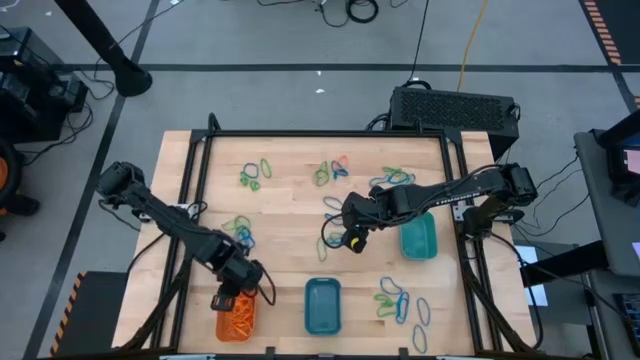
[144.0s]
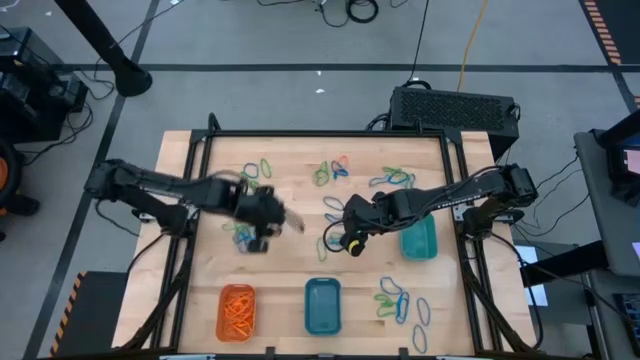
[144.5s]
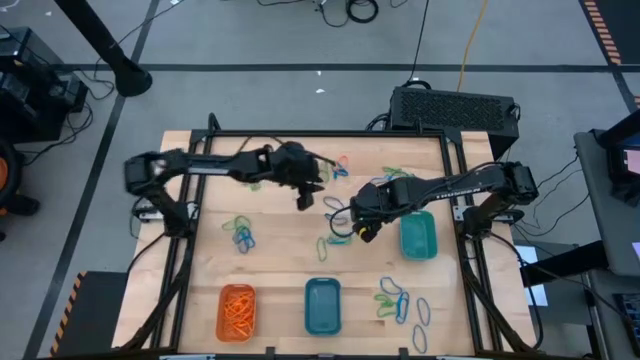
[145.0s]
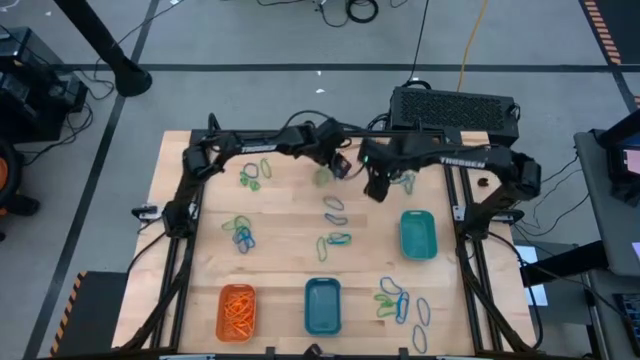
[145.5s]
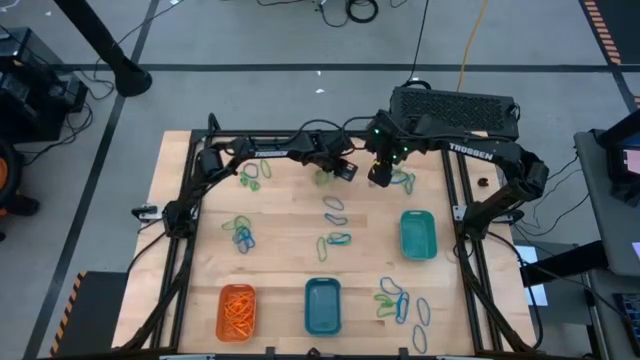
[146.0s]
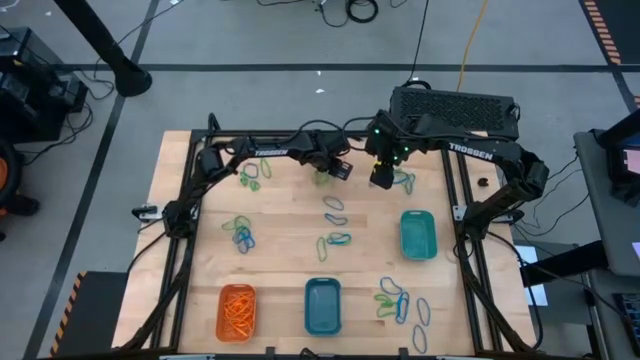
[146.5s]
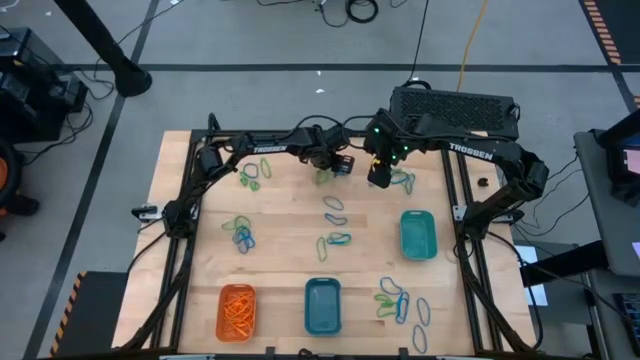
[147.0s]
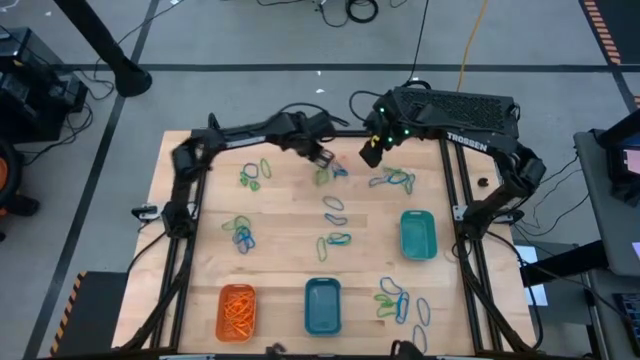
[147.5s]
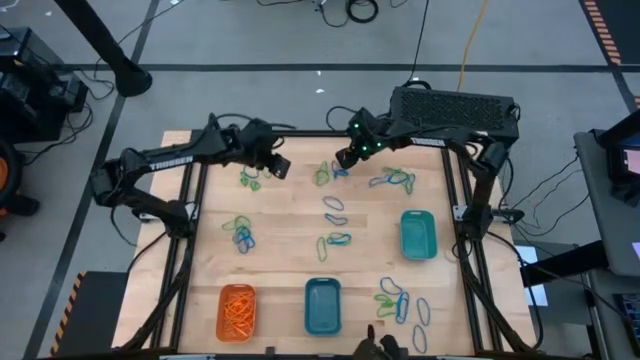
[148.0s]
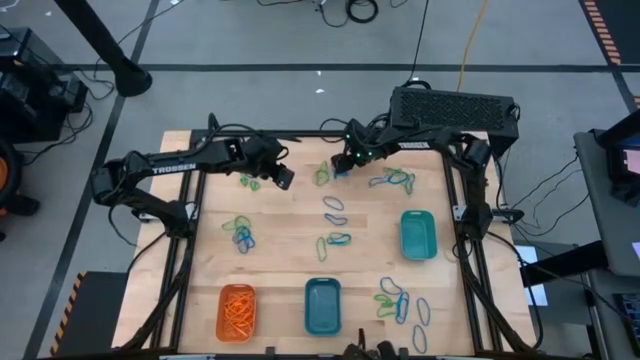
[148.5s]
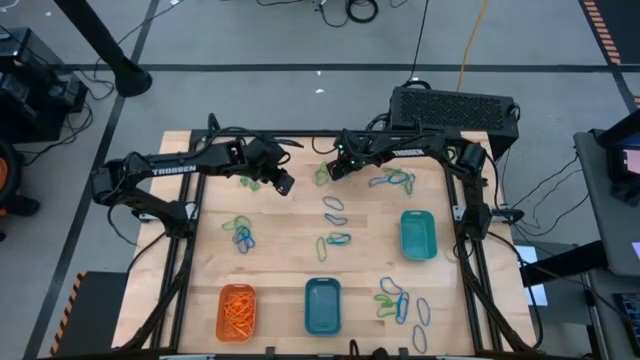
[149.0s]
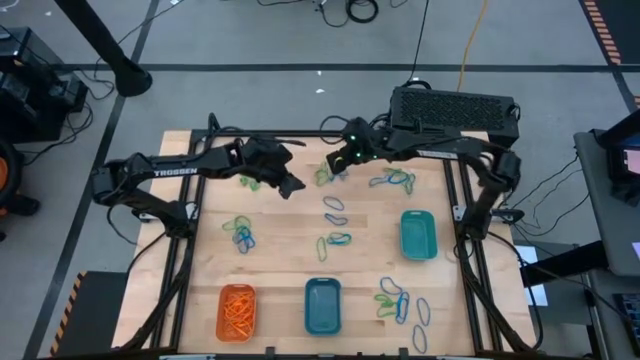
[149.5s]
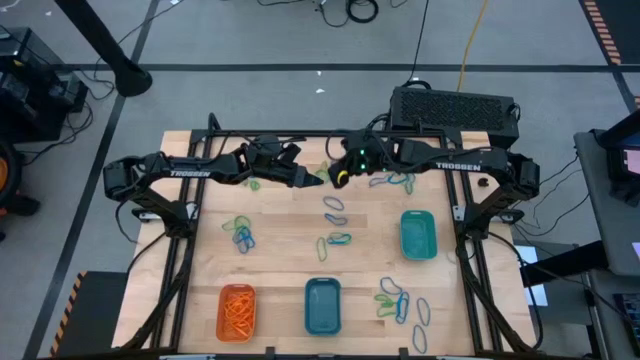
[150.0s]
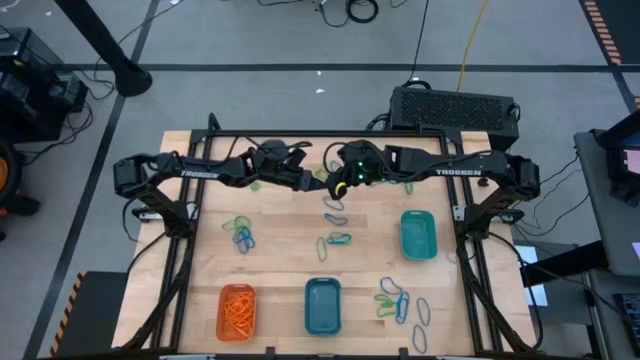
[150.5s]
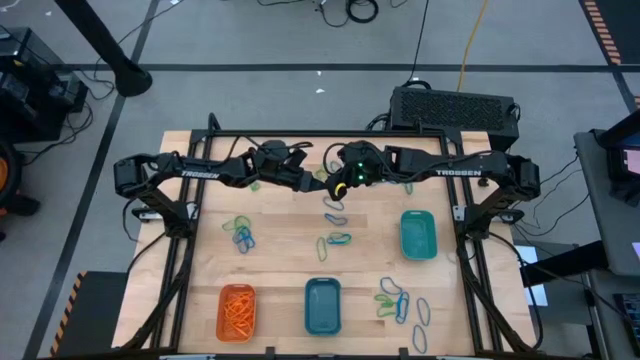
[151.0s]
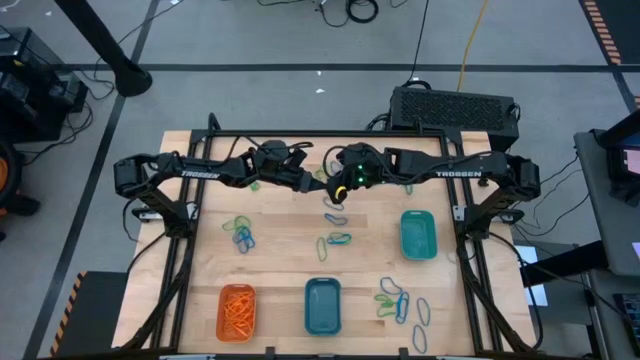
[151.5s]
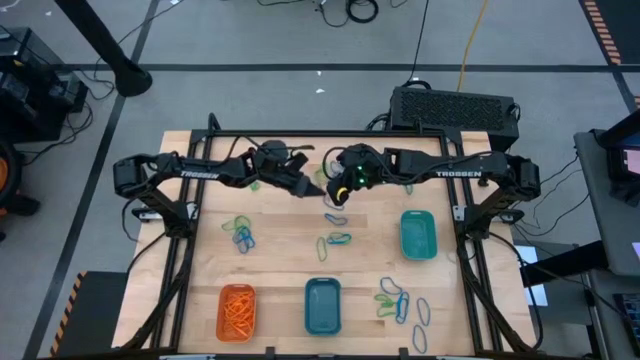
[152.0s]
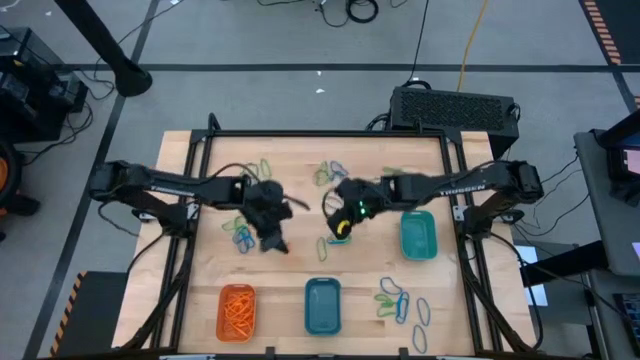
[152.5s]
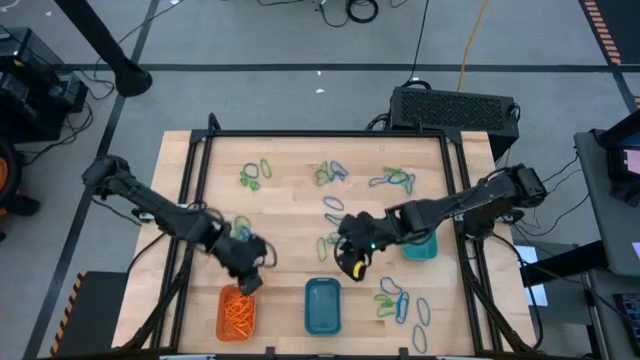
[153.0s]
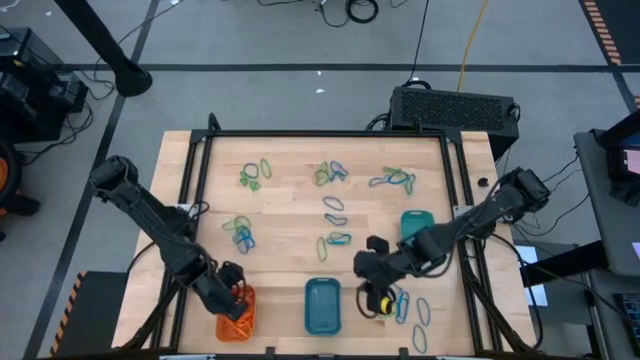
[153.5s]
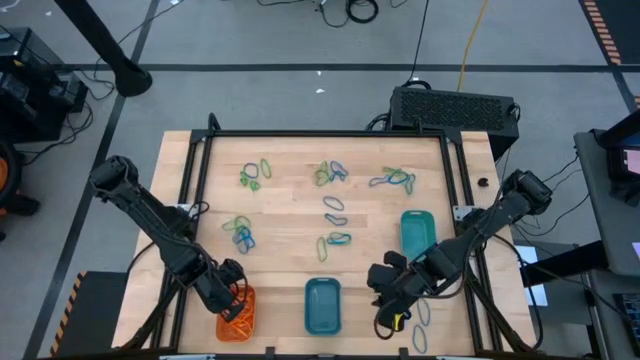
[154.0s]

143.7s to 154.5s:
Task: Sort rubber bands into baskets
Put the orange rubber band into the orange bin

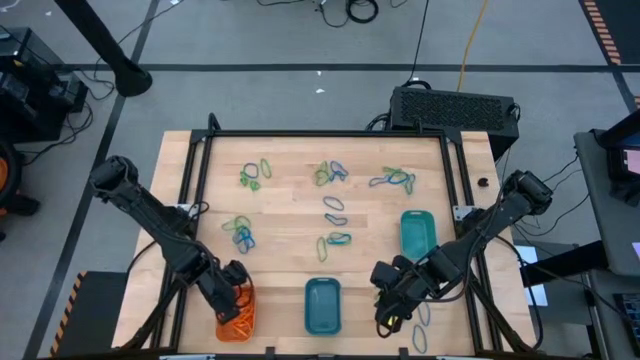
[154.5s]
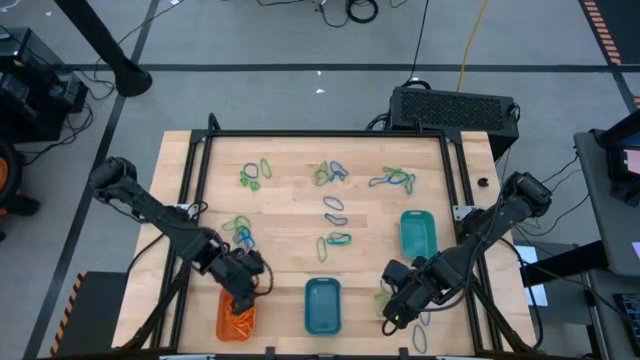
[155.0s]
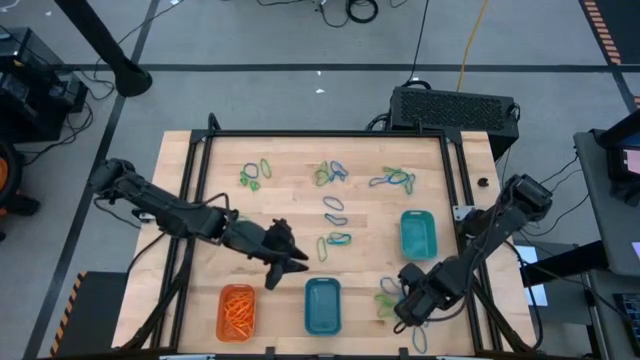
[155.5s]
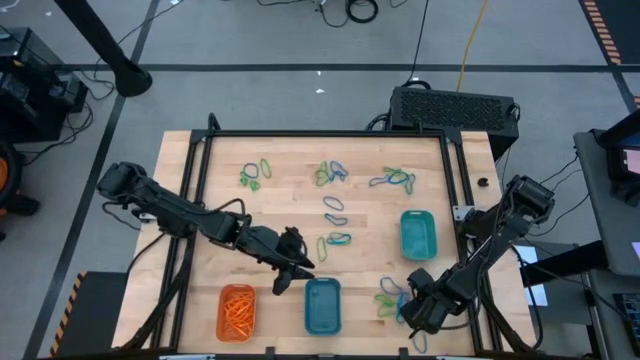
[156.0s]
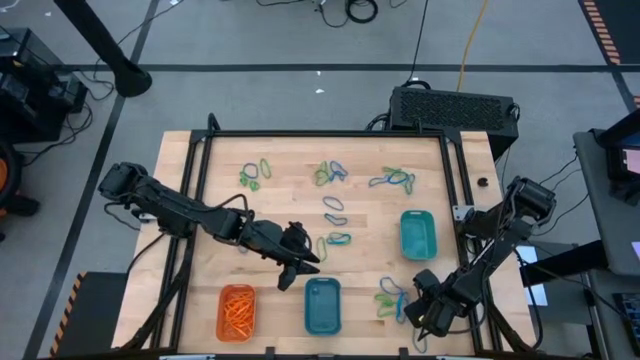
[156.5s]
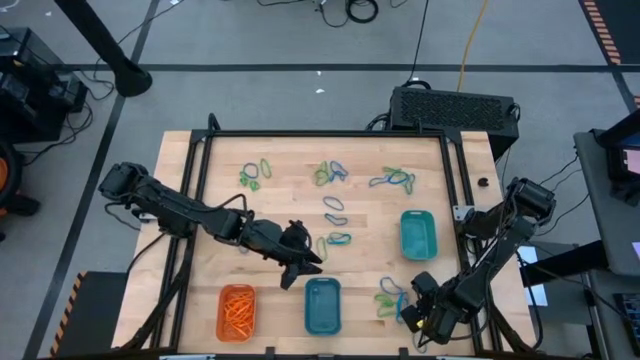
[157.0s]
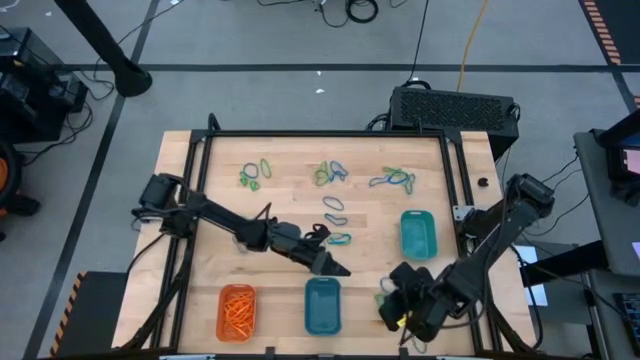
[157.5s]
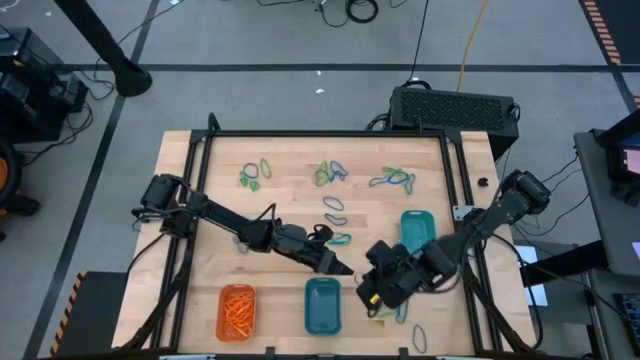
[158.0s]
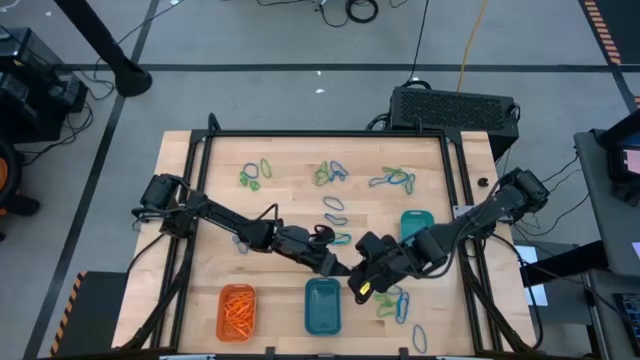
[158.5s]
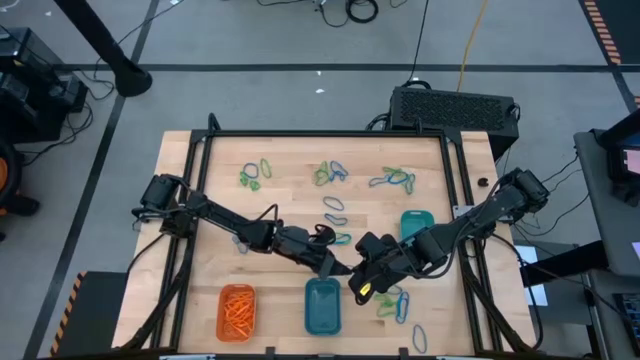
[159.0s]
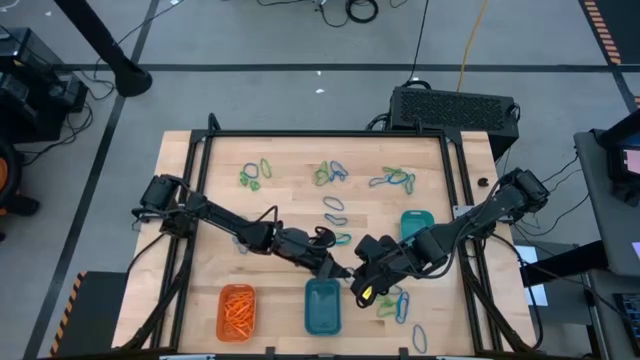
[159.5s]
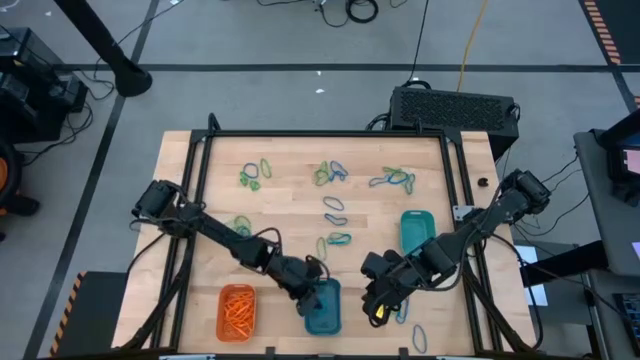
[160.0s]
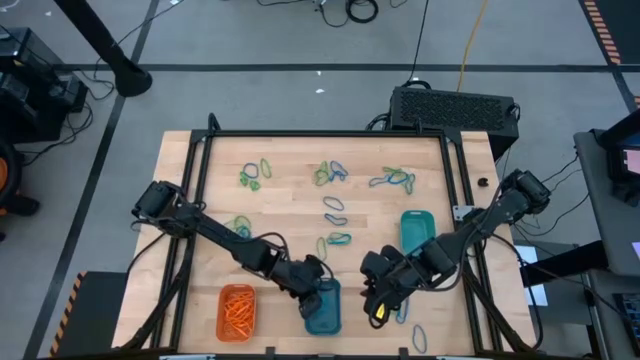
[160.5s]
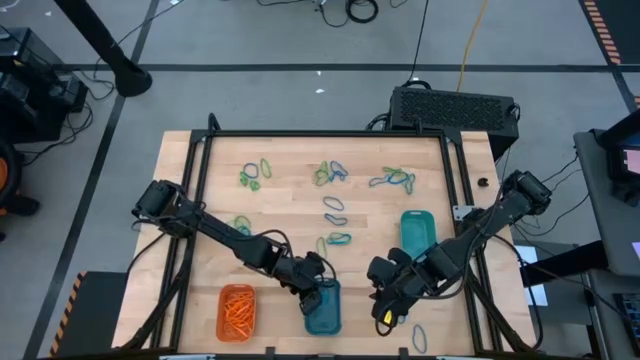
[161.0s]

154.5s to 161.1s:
Put the blue rubber band into the blue bin

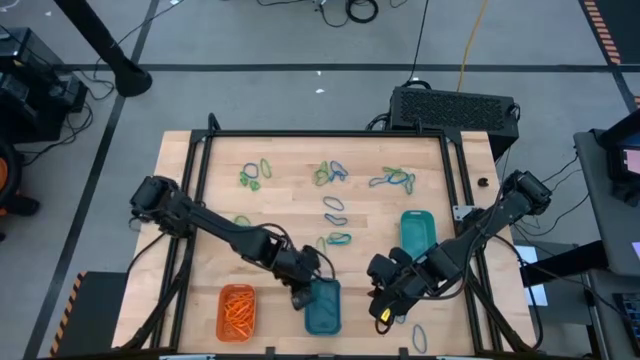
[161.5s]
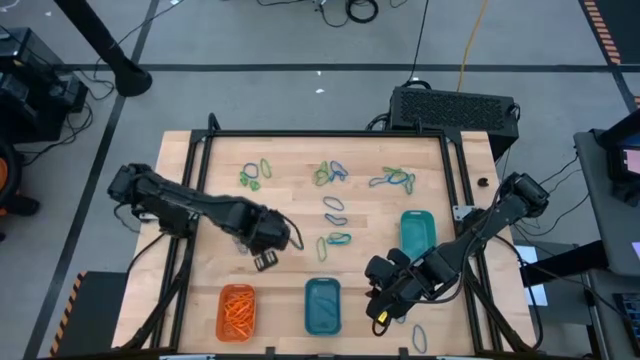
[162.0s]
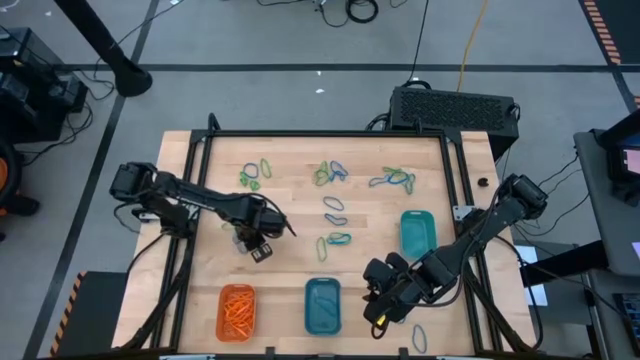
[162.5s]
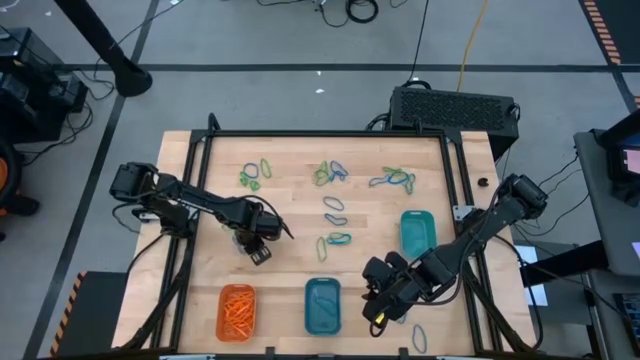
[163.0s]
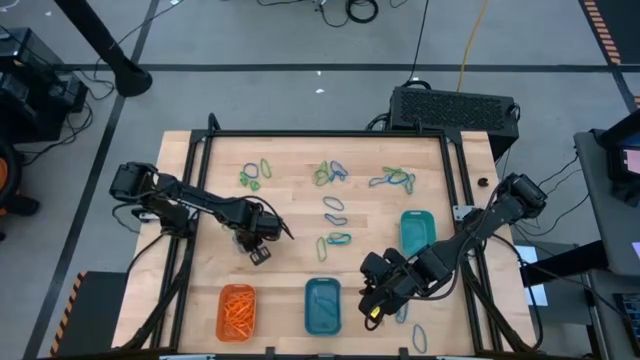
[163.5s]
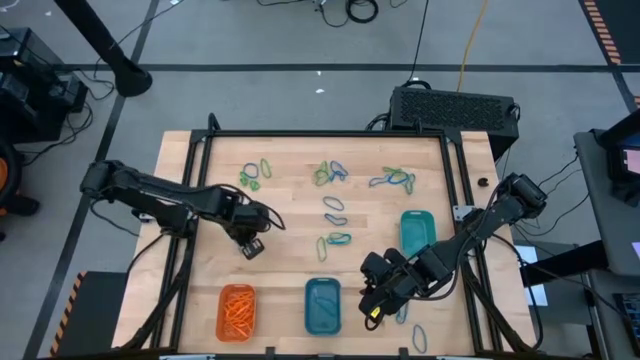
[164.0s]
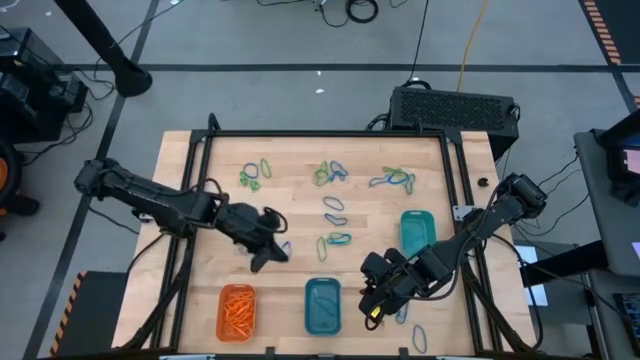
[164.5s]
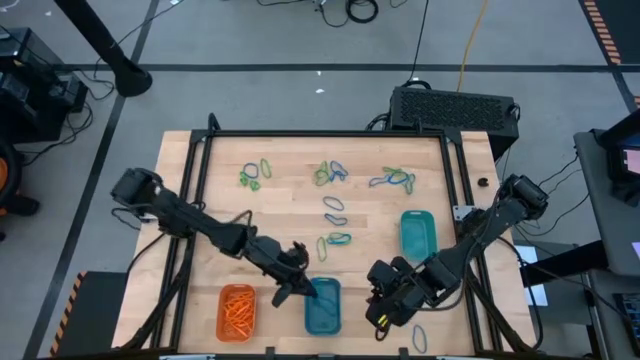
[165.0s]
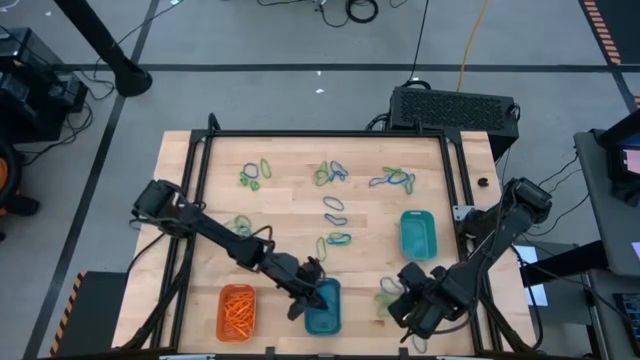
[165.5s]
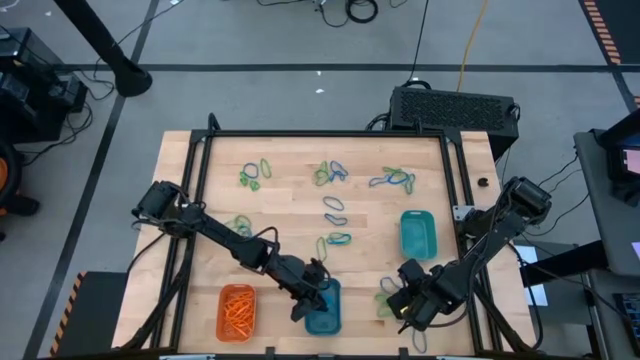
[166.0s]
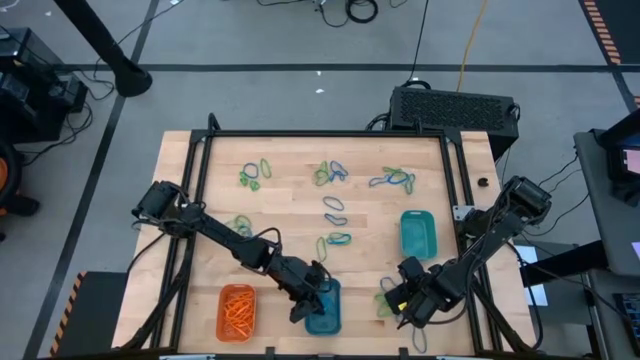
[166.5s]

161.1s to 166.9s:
Put the blue rubber band into the blue bin
